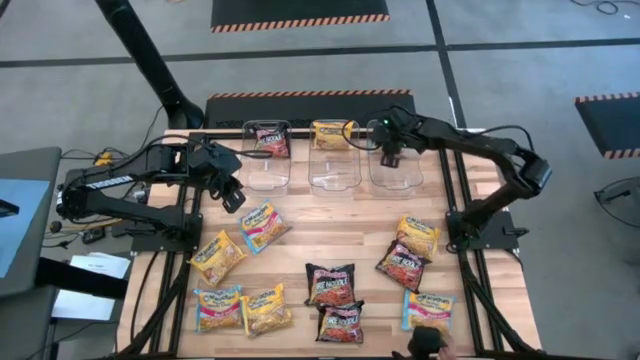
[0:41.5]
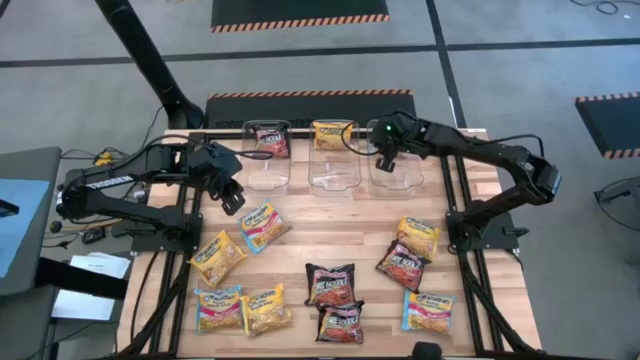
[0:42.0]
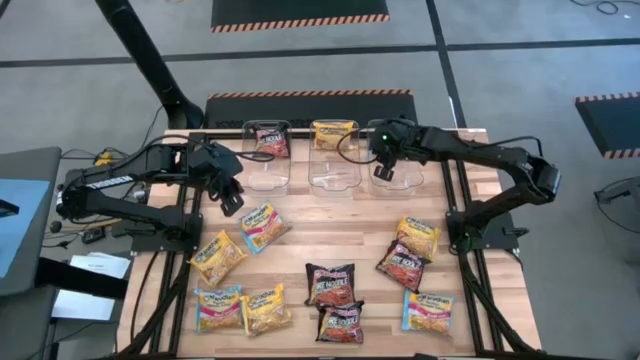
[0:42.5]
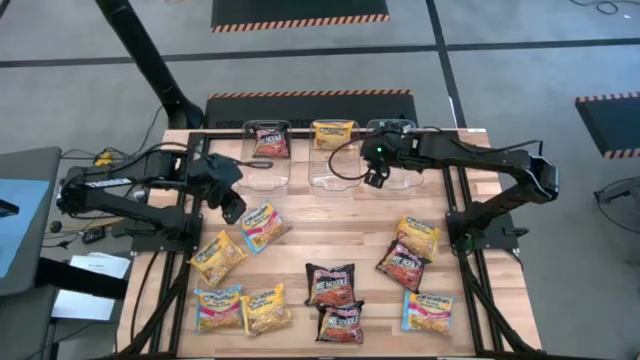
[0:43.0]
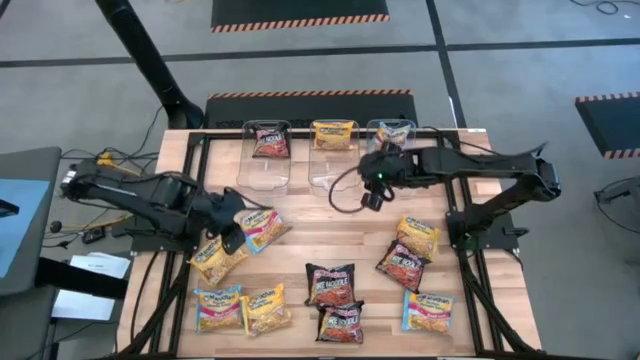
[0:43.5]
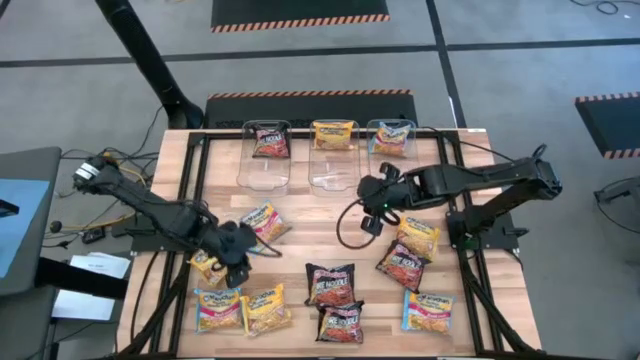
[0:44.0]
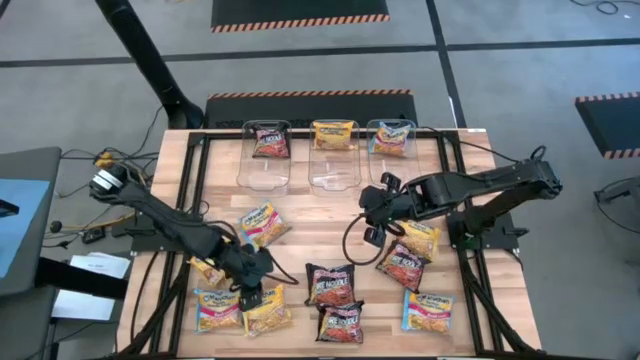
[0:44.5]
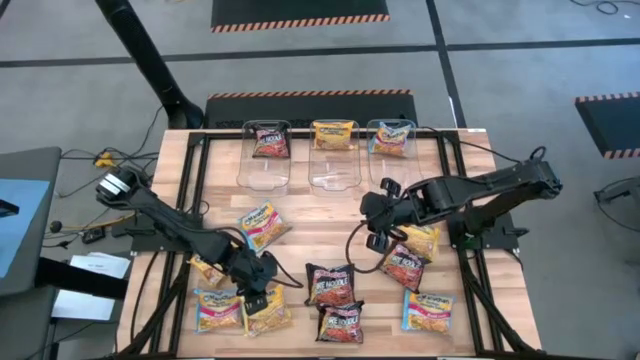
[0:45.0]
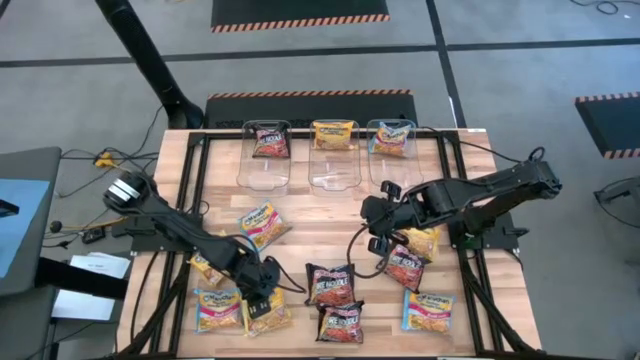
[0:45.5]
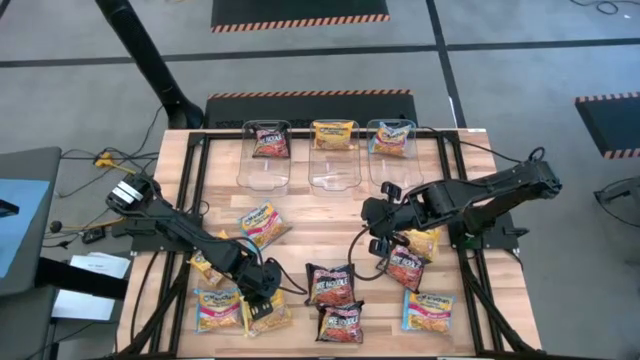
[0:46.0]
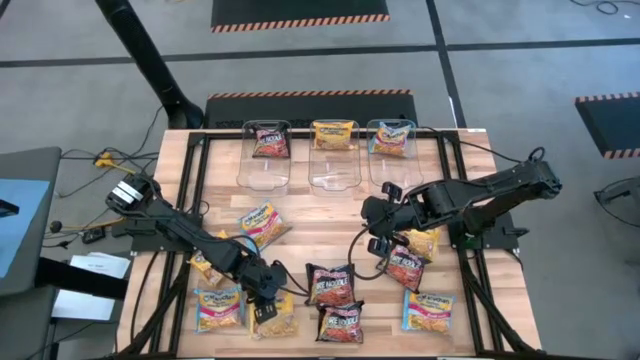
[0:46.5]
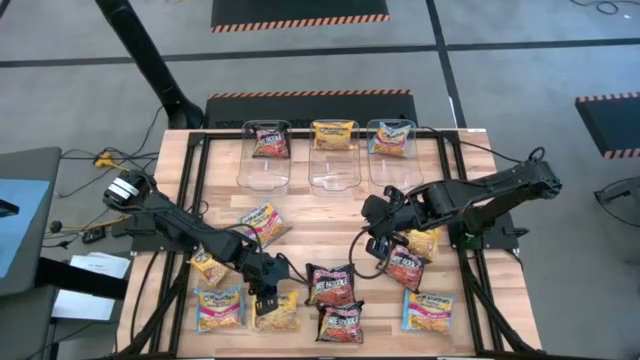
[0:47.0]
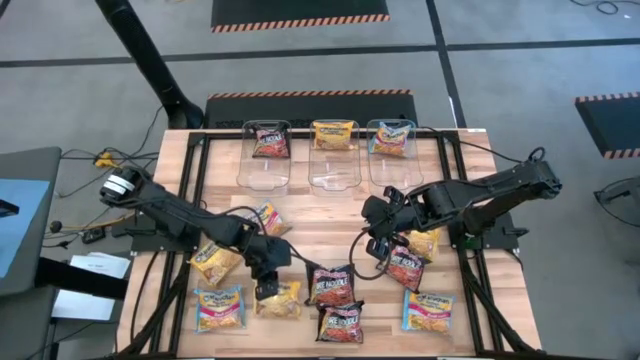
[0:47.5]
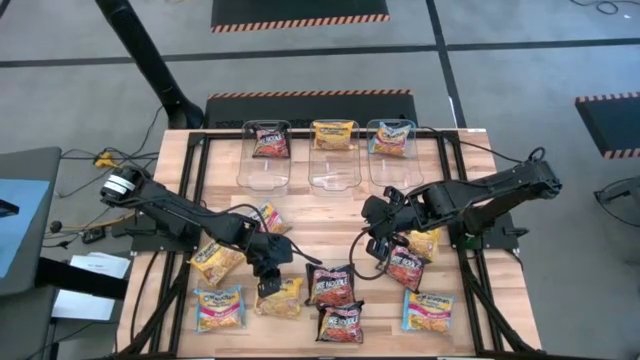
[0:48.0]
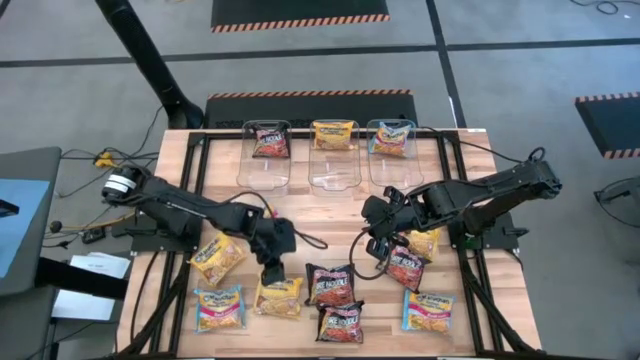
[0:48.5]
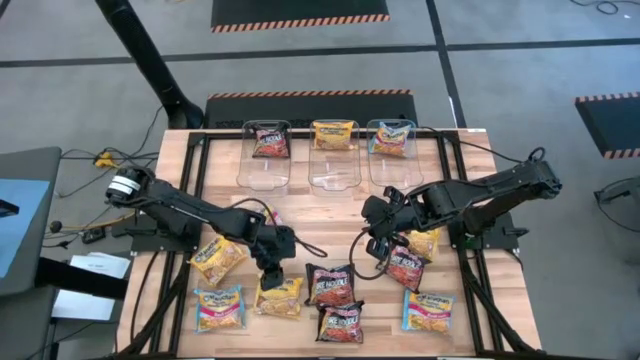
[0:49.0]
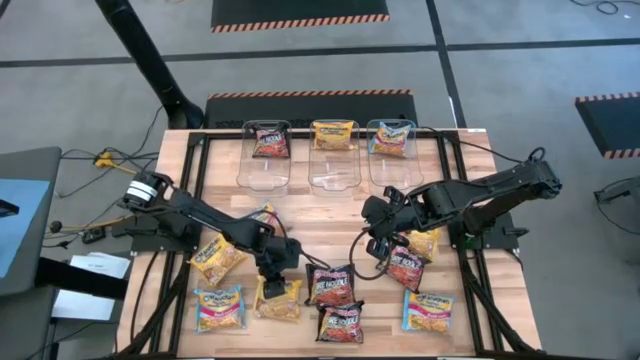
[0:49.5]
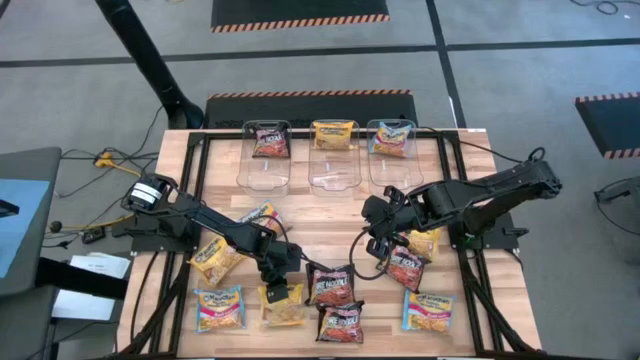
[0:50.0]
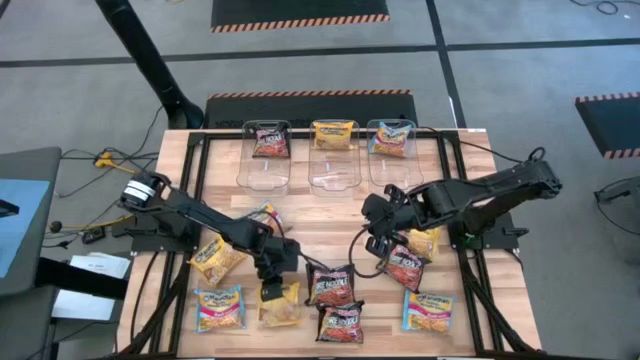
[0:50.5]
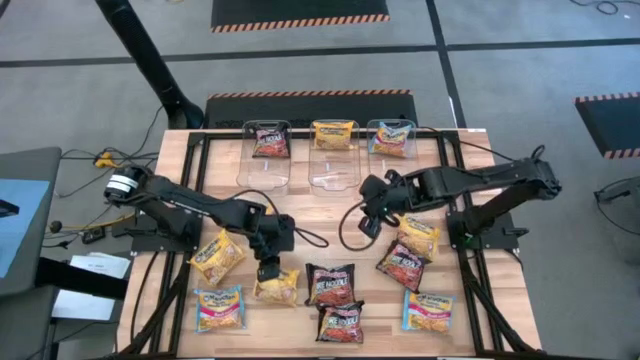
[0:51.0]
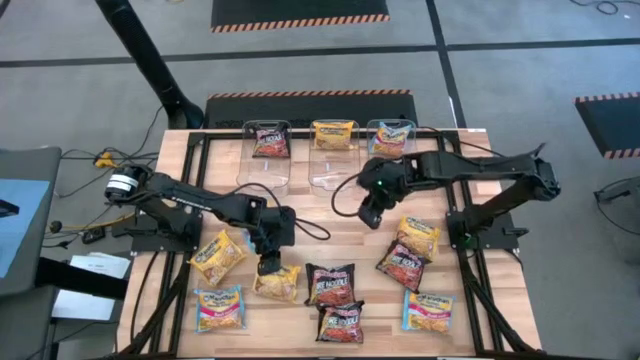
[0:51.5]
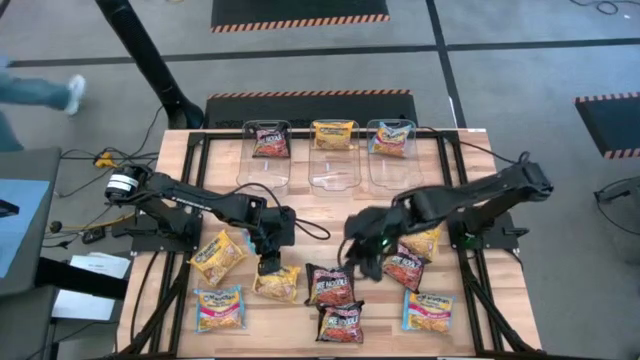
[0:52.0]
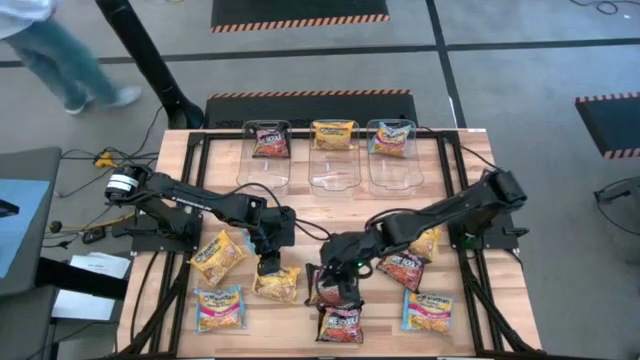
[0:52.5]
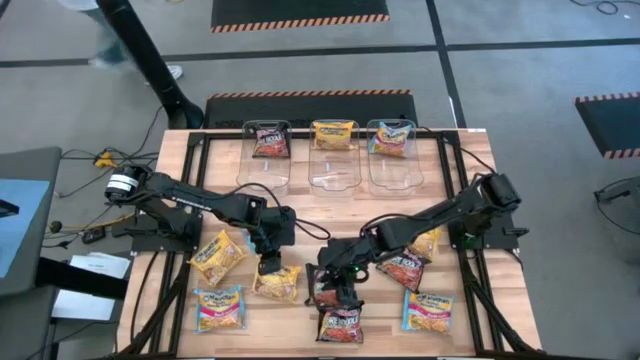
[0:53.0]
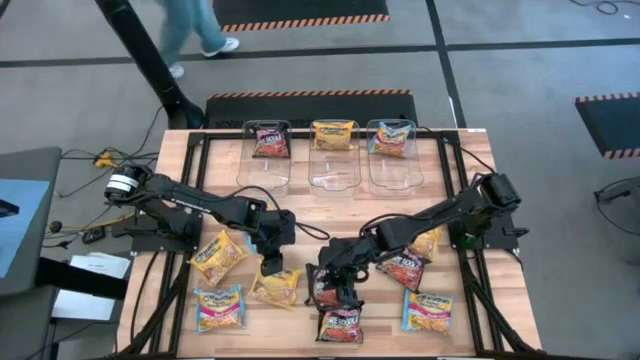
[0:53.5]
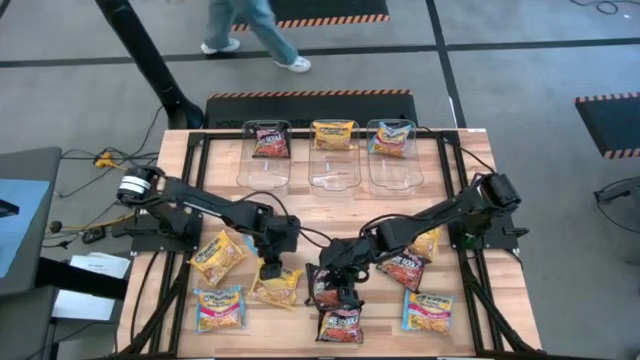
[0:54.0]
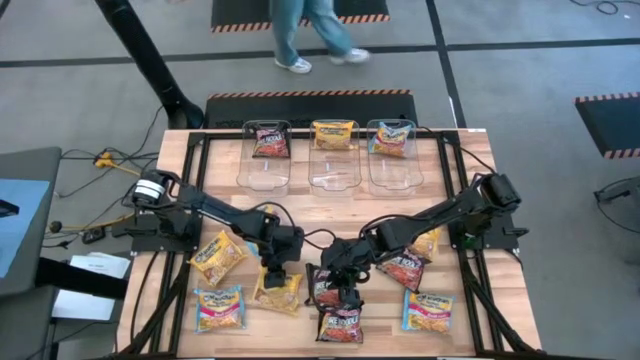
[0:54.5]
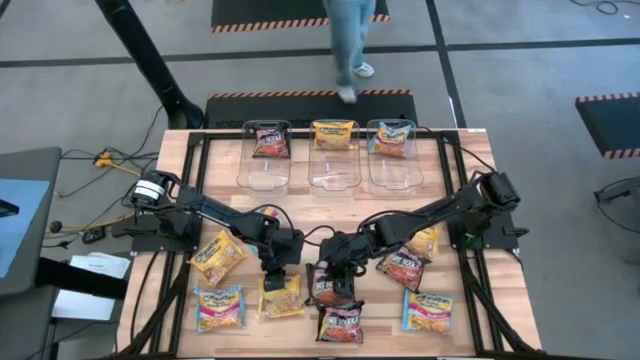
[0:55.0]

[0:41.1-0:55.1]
Task: Sort Maruchan noodles
Put the yellow noodle pack into the center transparent bin

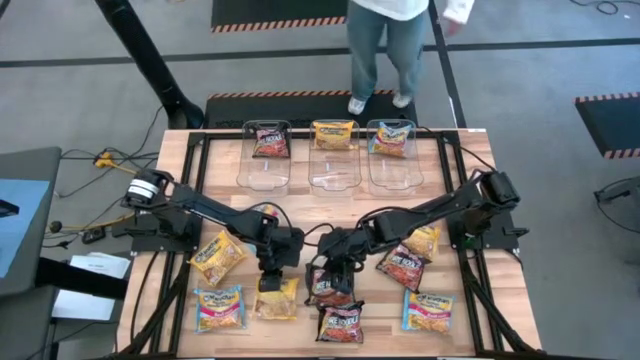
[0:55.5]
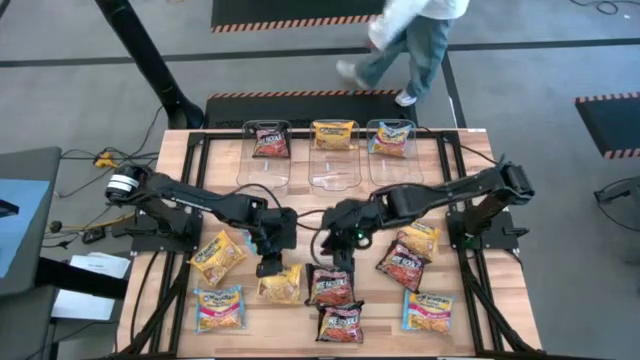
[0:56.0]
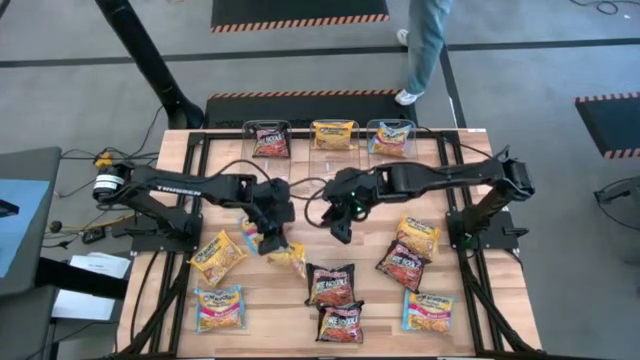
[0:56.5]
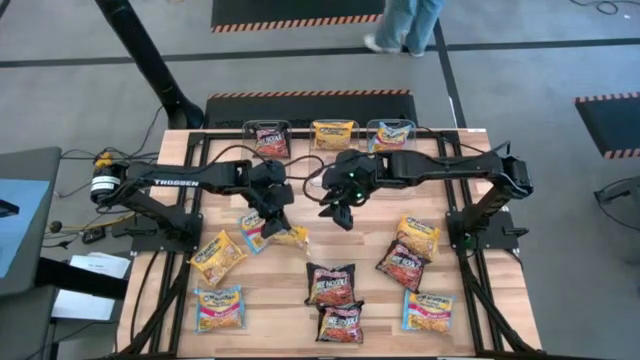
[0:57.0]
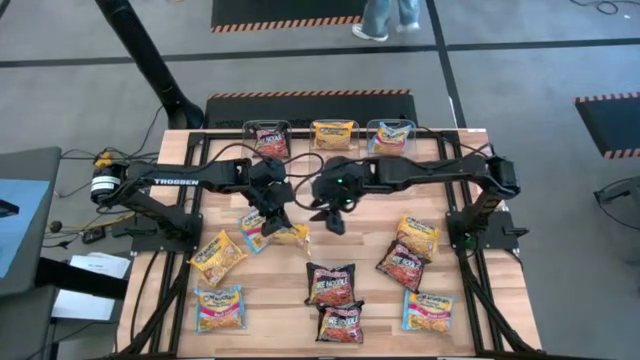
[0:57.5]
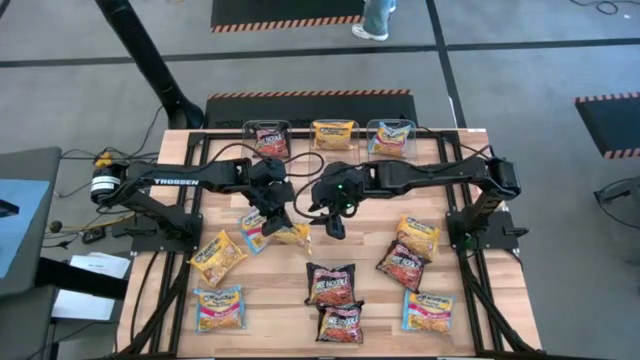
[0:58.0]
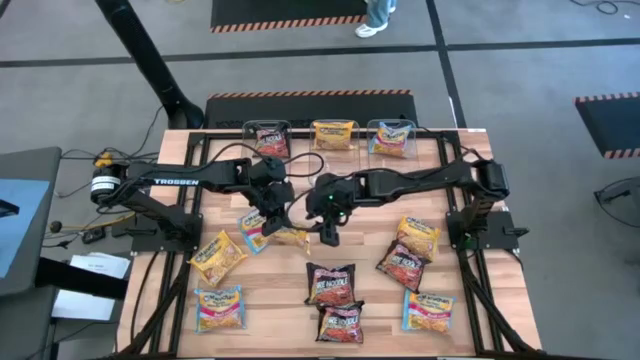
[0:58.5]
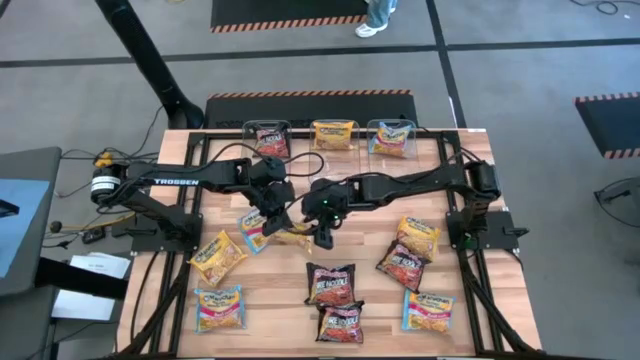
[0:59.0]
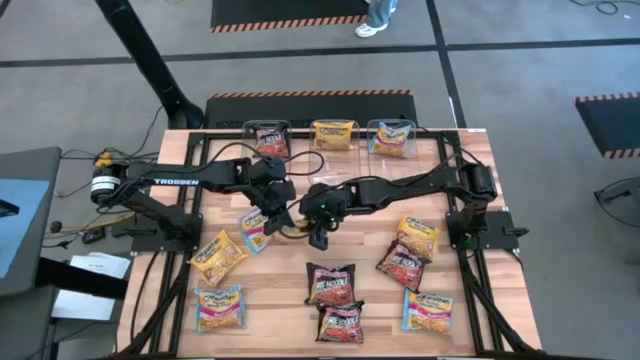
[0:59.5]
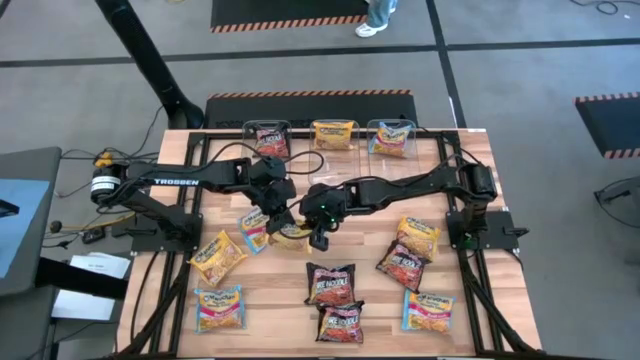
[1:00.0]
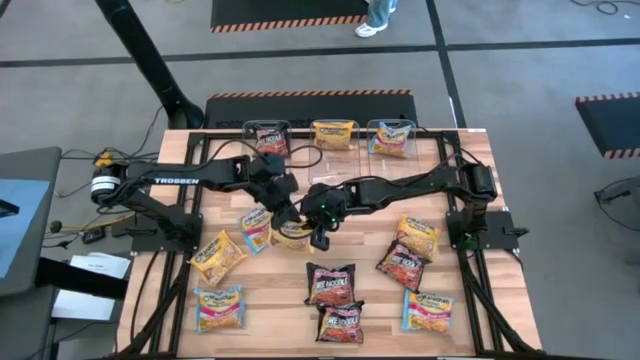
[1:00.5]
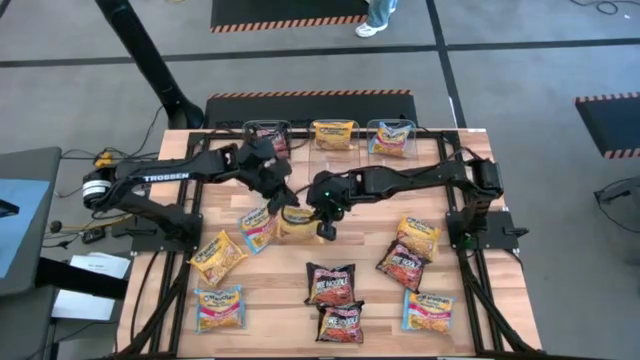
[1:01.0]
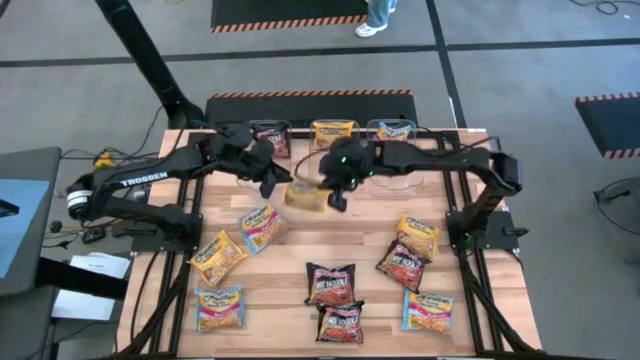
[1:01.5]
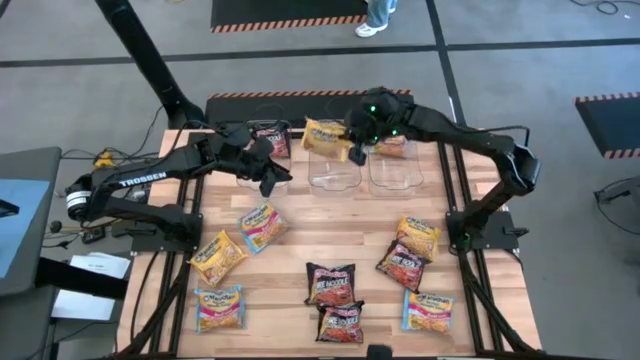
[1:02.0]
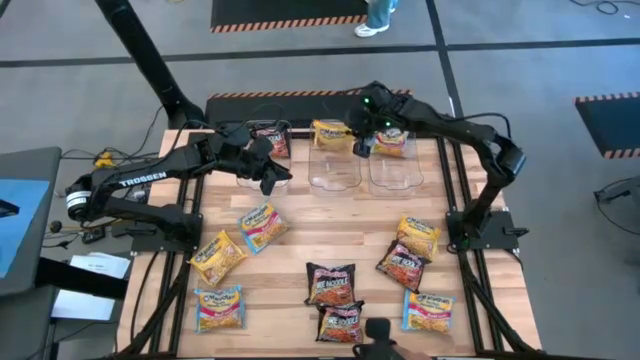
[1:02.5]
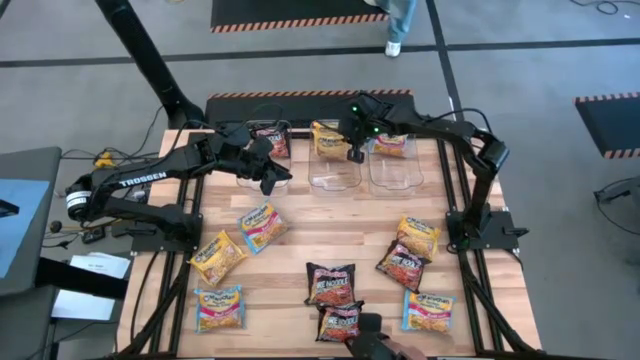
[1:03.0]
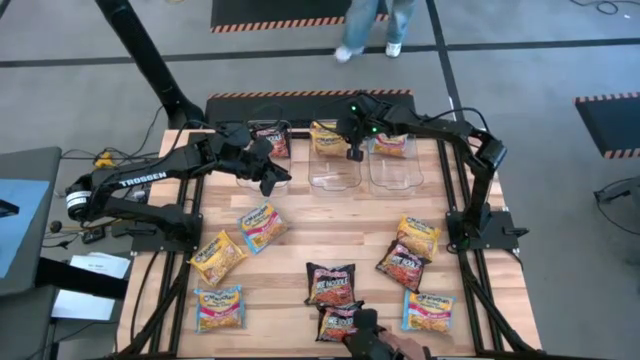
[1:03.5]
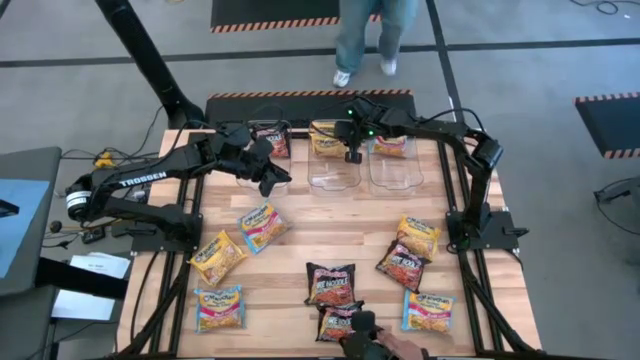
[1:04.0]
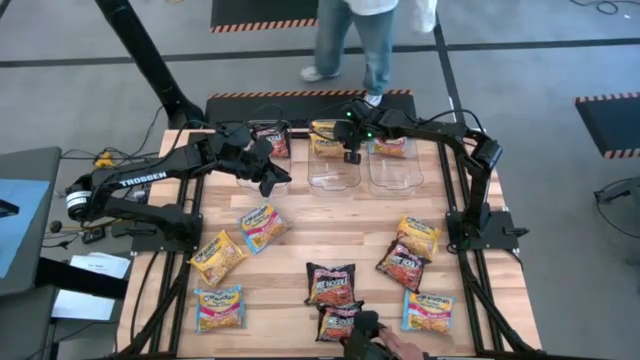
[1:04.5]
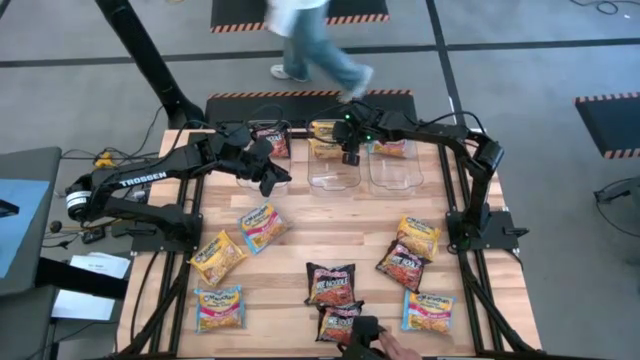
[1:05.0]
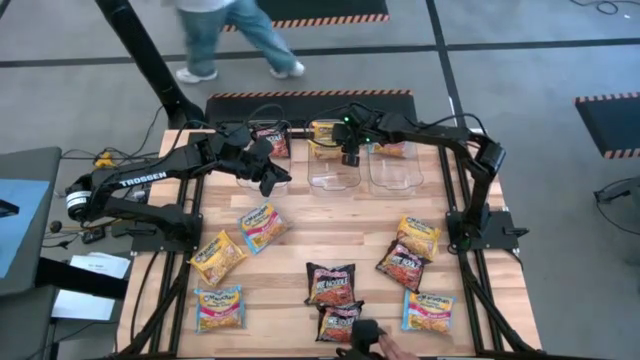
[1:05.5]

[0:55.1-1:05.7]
Put the yellow noodle pack into the center transparent bin
